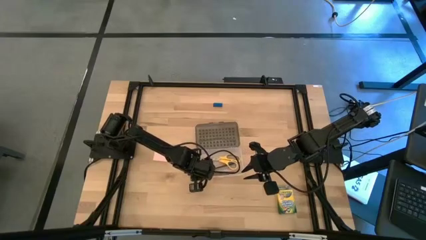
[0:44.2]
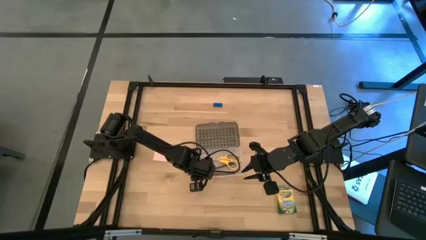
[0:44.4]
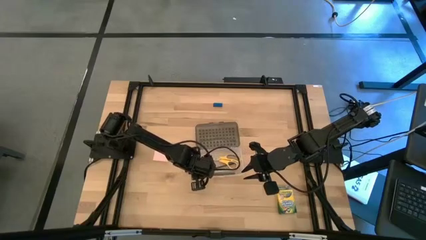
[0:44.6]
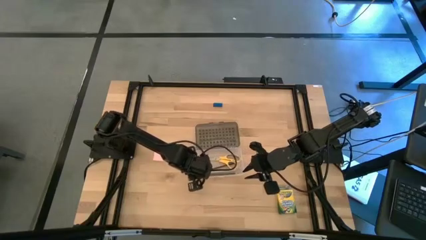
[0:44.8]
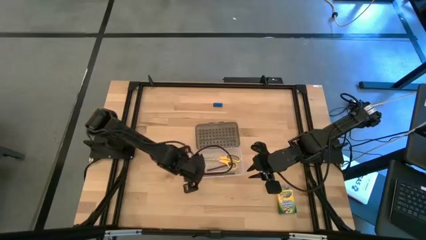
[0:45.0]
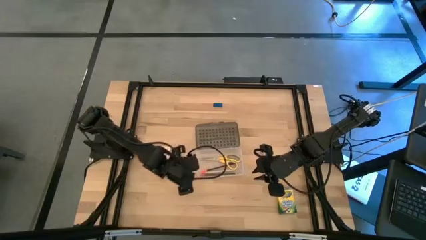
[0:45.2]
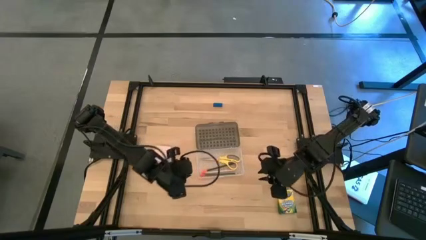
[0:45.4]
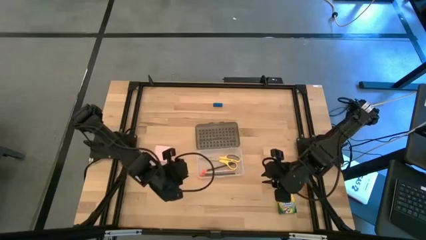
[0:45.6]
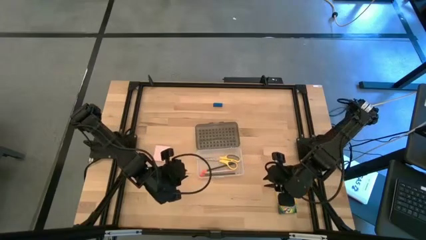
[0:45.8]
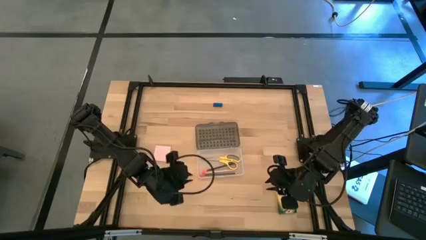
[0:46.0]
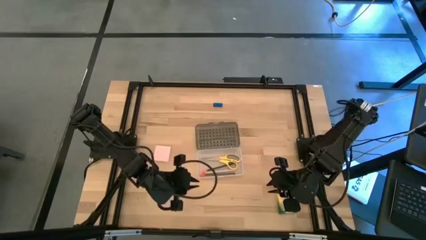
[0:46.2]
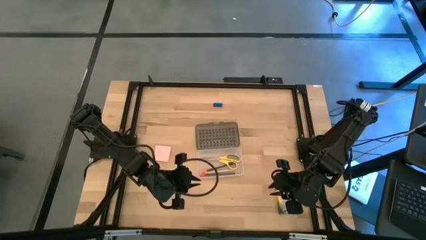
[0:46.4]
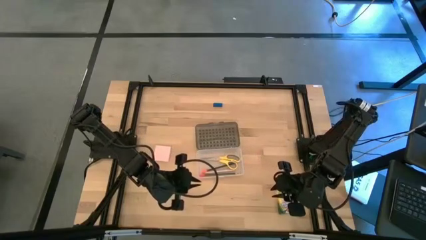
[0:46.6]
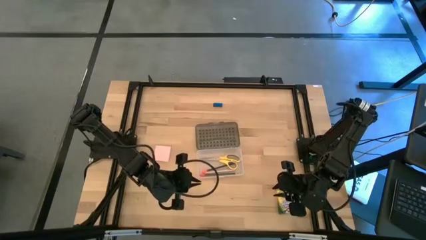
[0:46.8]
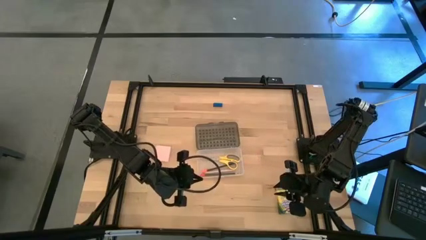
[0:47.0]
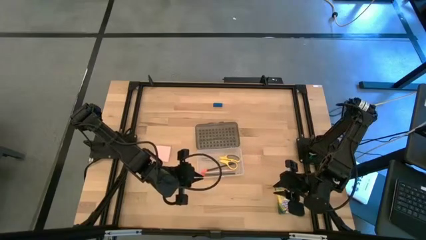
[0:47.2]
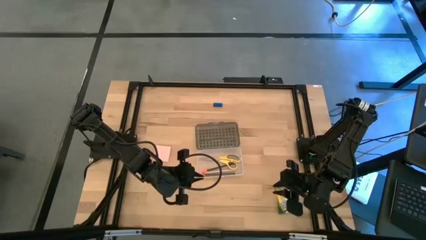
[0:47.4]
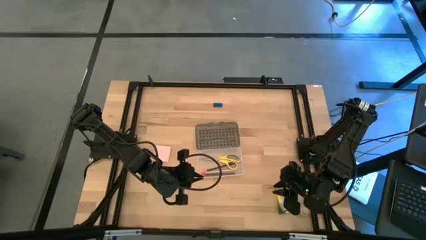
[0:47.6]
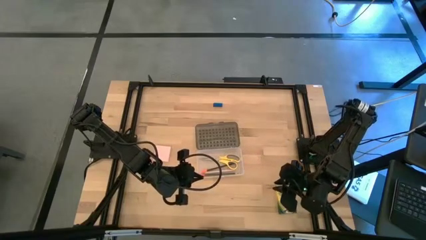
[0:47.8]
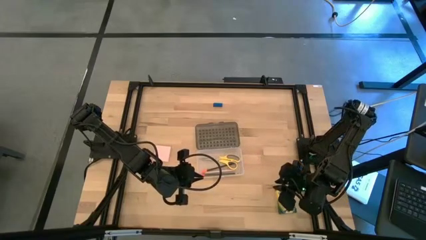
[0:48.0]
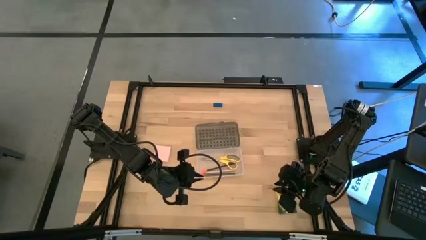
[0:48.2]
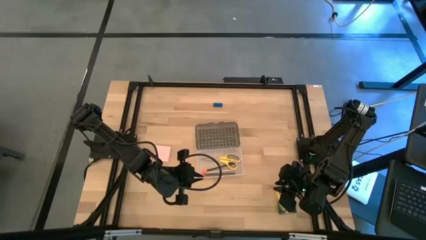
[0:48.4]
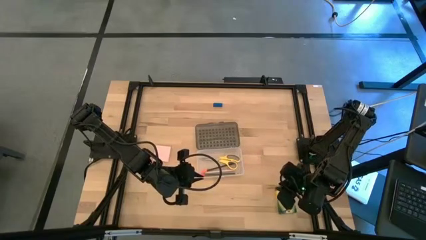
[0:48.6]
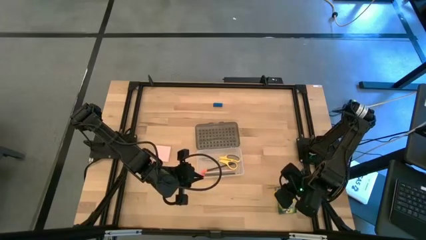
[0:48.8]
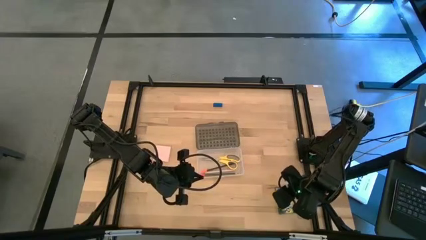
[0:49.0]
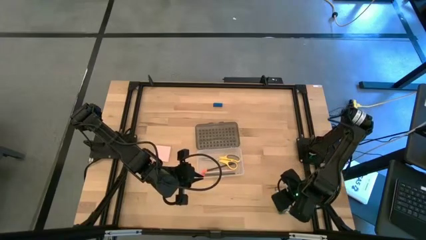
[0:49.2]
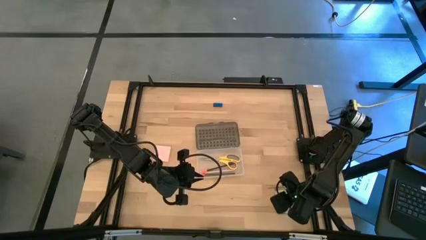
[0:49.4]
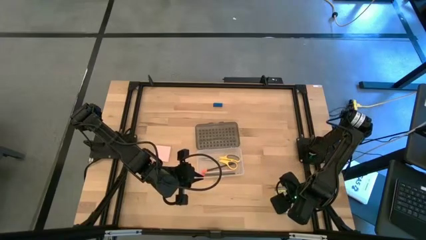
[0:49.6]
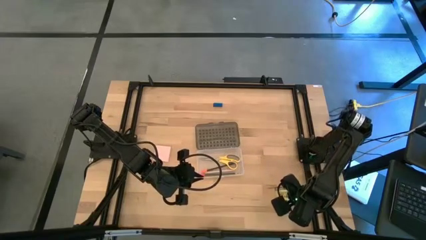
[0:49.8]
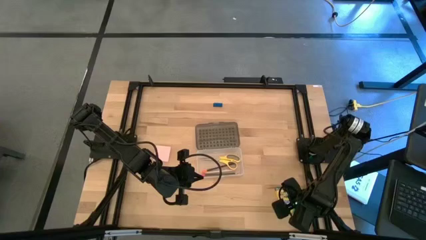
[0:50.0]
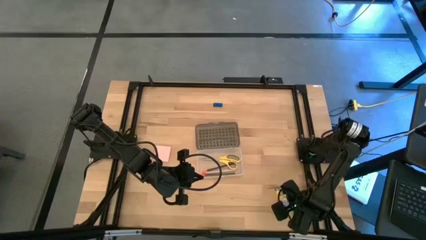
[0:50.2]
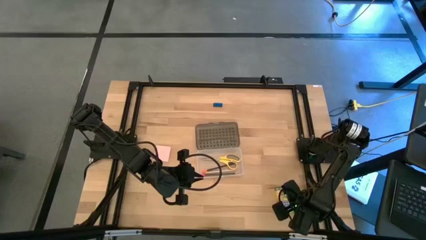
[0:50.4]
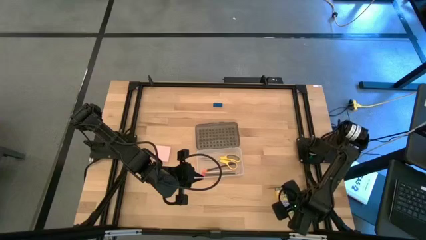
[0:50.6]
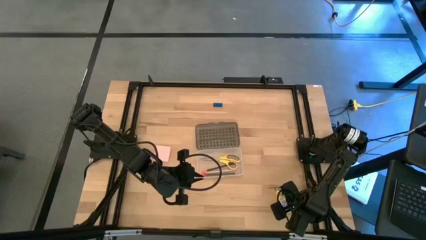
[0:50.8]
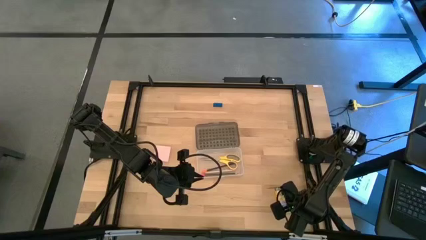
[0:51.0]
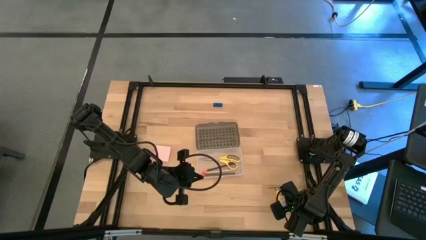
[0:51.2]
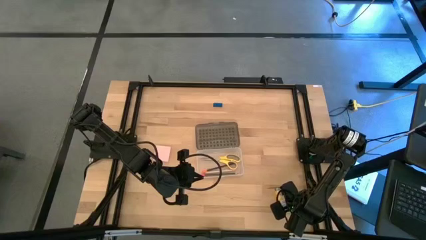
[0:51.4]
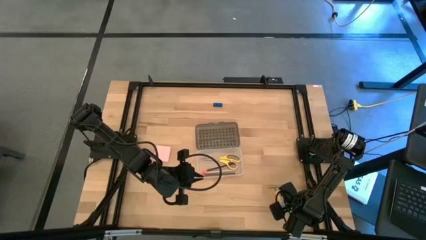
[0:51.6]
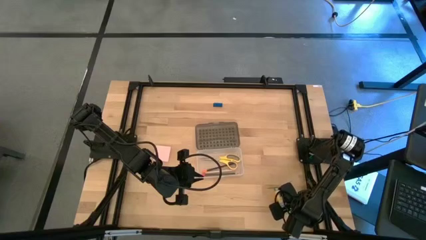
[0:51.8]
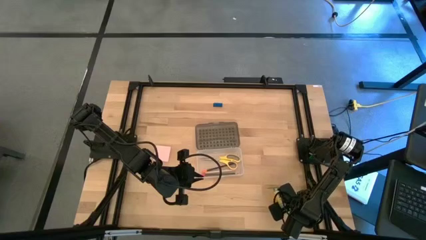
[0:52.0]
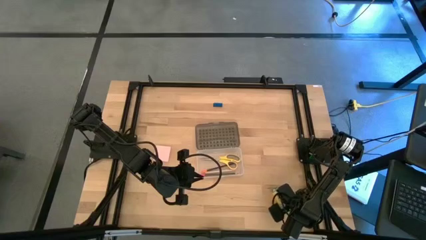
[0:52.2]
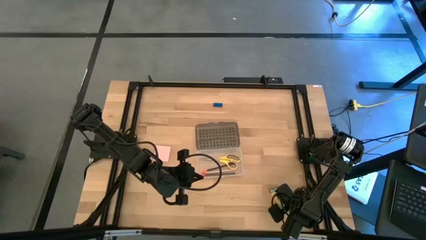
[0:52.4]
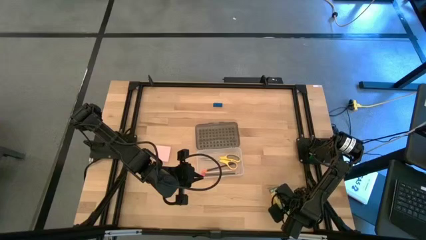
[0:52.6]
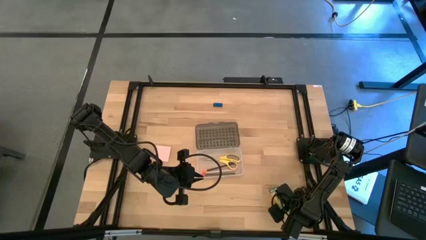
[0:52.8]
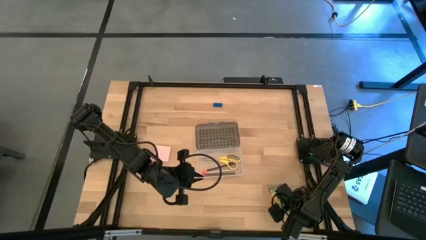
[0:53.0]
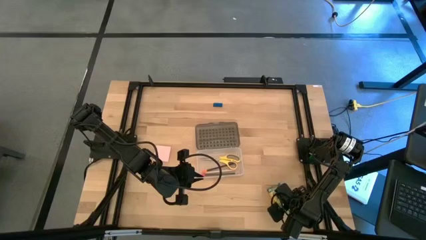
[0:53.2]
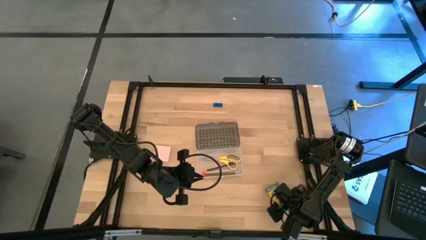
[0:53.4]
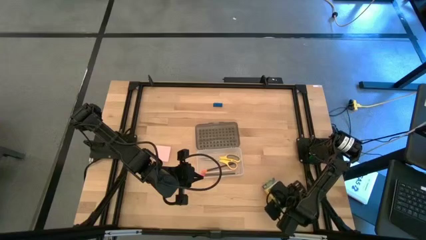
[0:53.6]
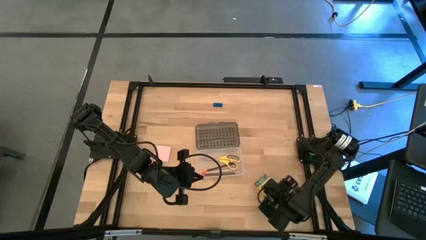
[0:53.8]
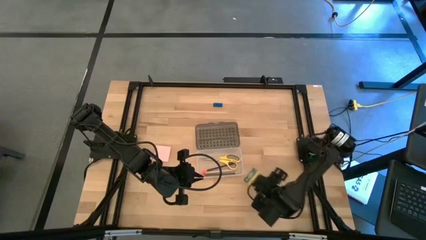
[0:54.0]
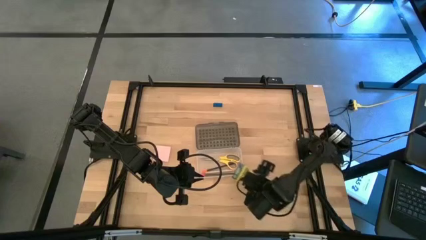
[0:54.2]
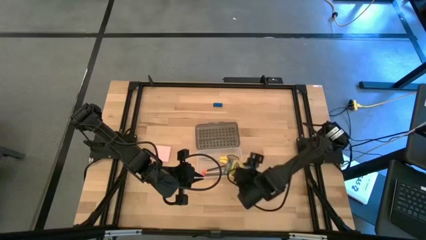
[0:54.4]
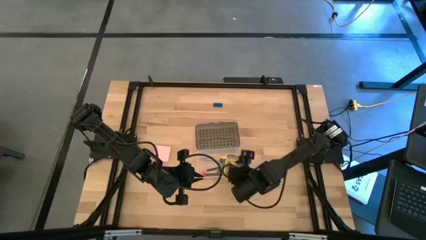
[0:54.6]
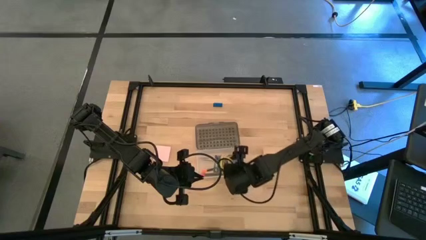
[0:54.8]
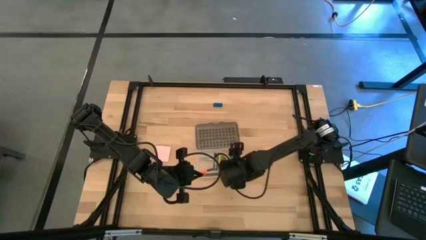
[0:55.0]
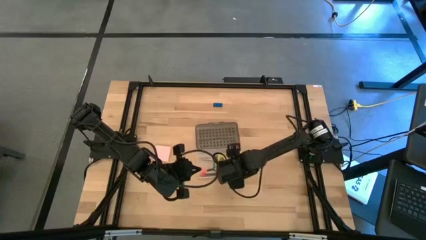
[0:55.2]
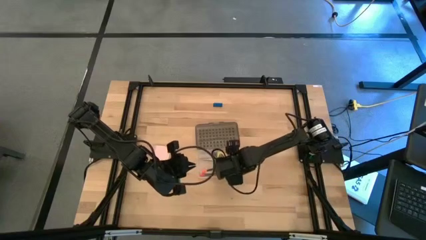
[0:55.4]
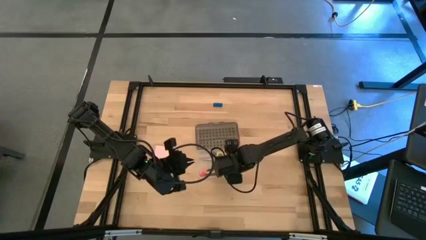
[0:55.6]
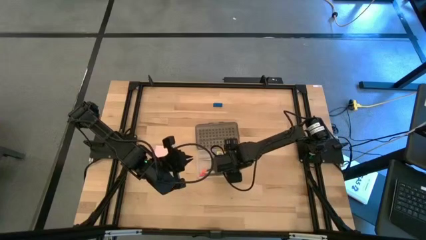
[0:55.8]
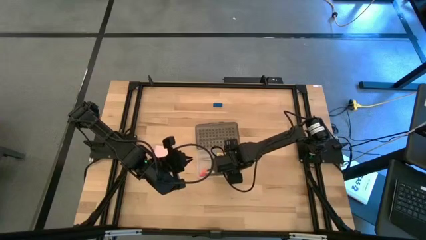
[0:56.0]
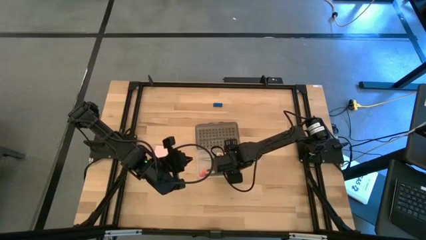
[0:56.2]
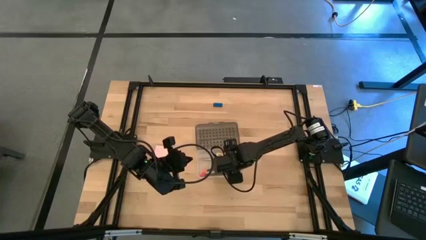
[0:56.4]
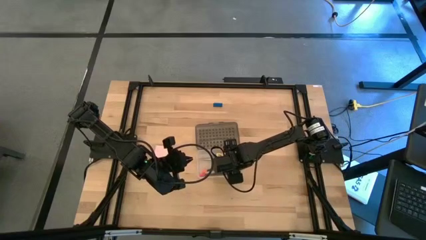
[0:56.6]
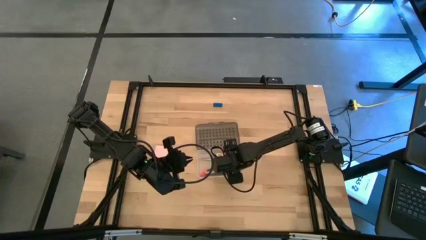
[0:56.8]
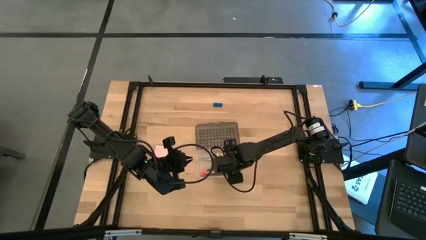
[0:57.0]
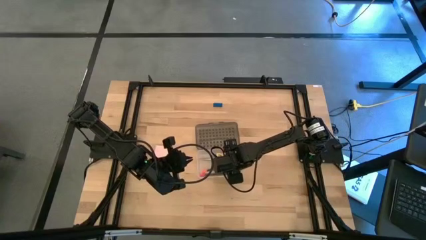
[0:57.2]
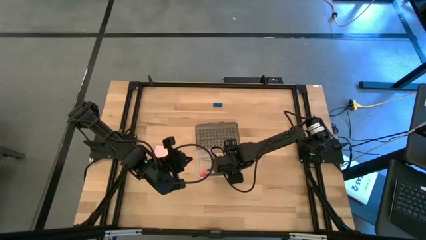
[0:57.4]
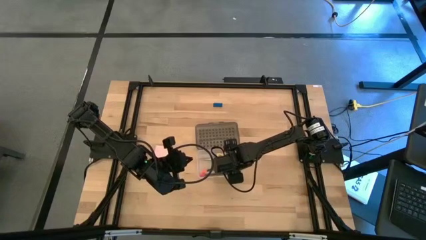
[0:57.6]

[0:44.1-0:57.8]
Task: Pack school essentials
Put the yellow crayon box into the black supply box
